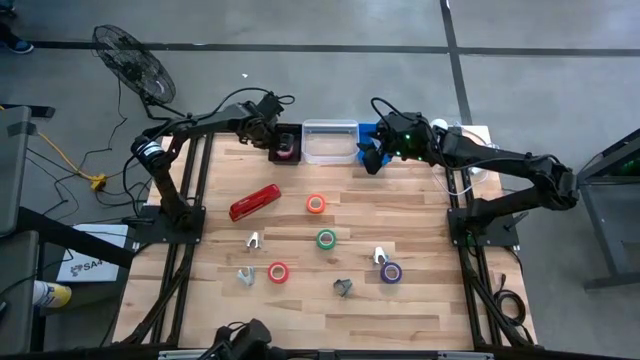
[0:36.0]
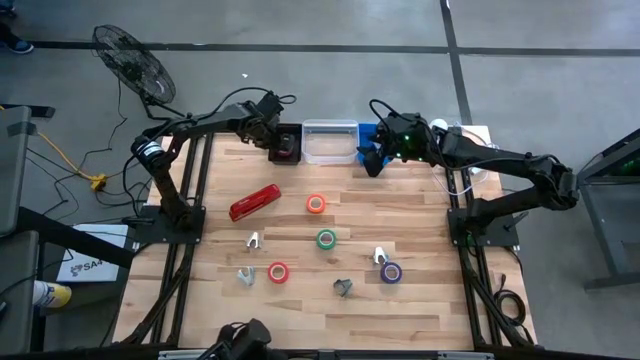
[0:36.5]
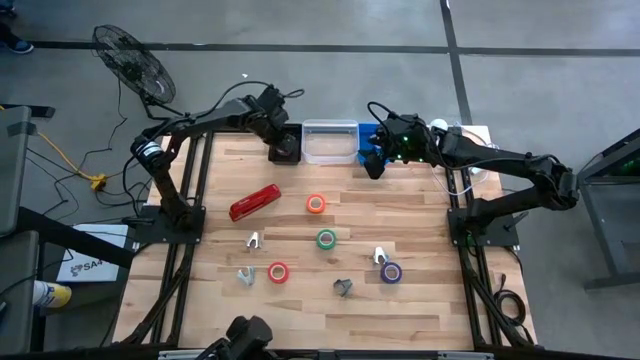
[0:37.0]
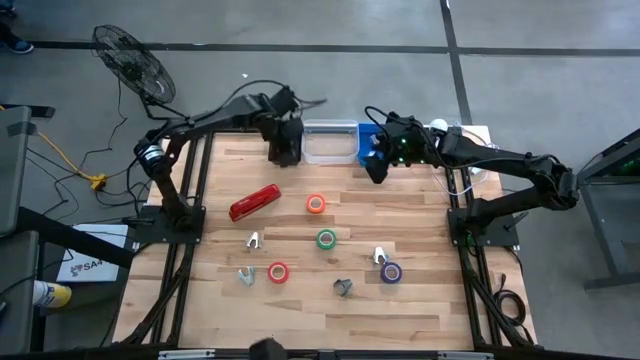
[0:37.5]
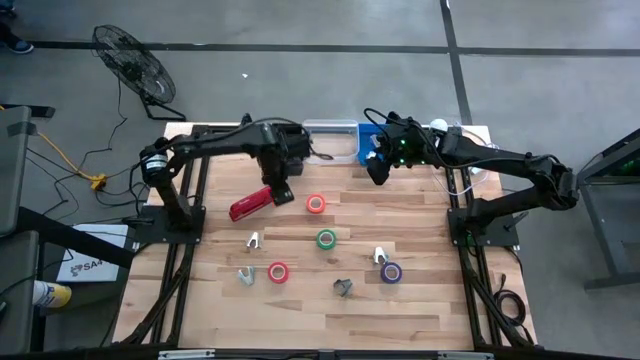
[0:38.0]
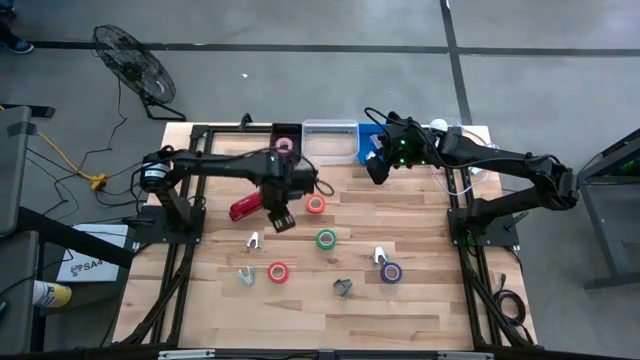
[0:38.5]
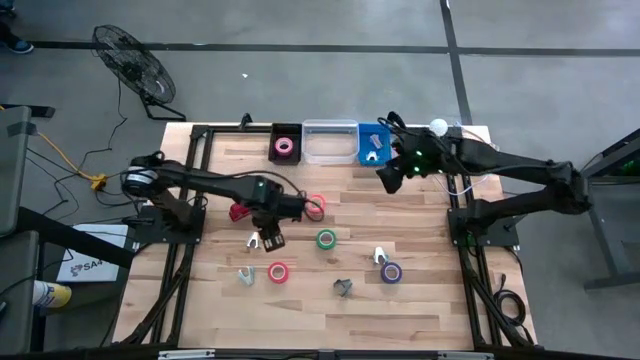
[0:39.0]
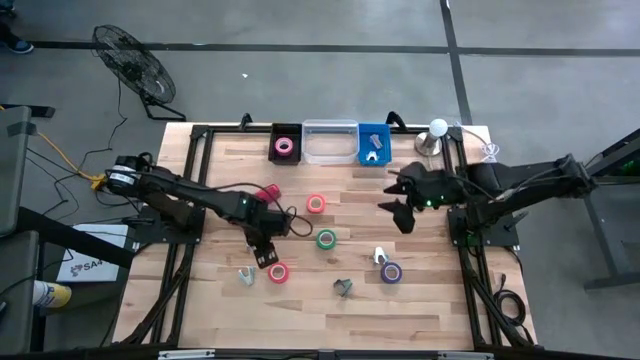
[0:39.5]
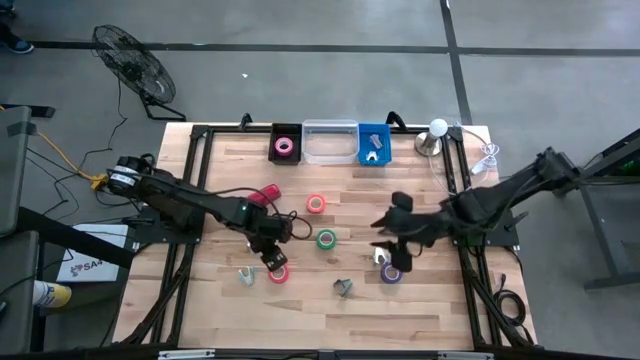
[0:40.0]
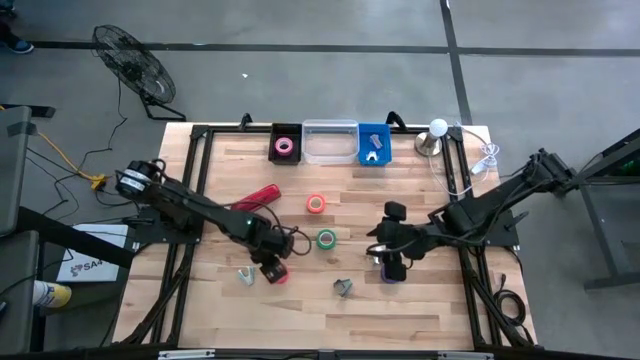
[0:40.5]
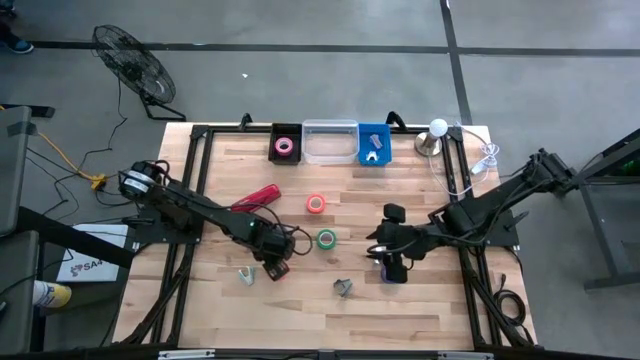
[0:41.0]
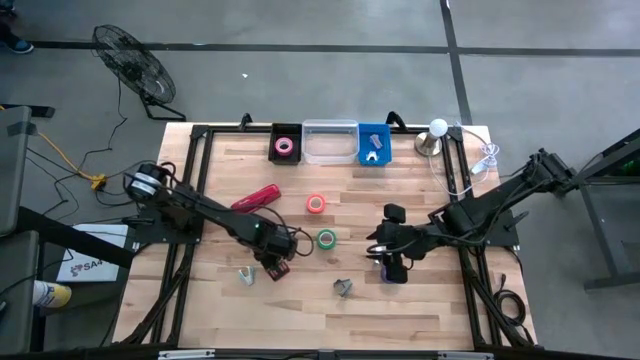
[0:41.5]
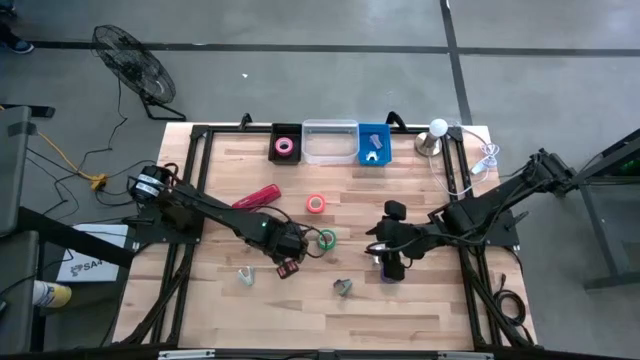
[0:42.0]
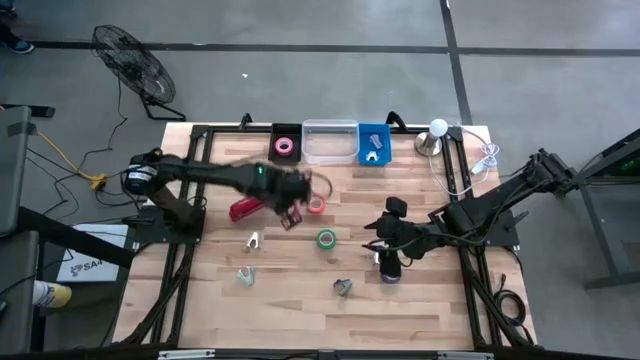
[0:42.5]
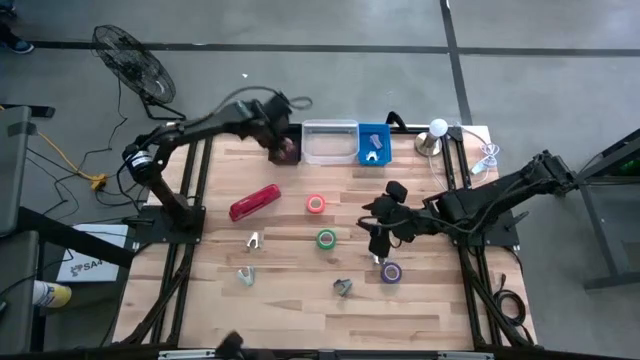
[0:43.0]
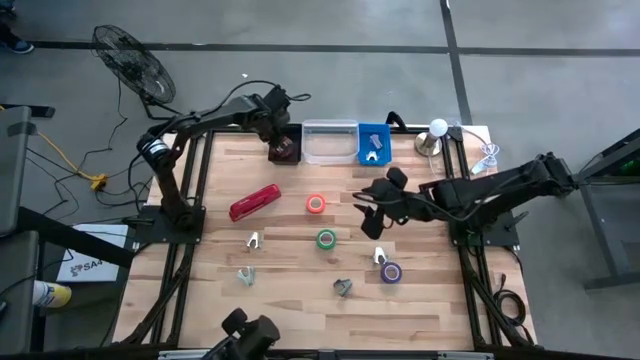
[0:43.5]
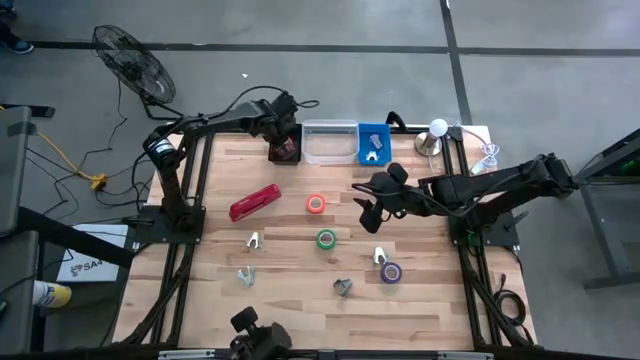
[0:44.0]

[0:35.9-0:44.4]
Task: Pick and place Stapler, Stapler remover, tape
Put the red tape into the black bin

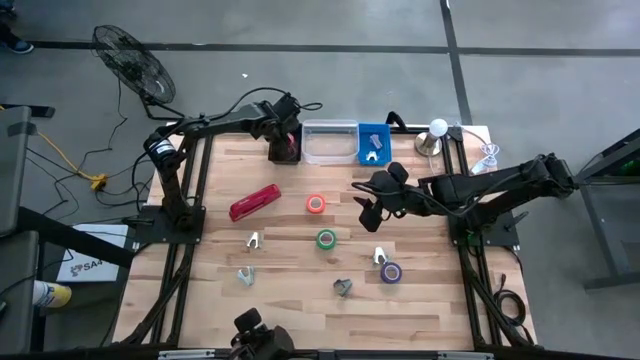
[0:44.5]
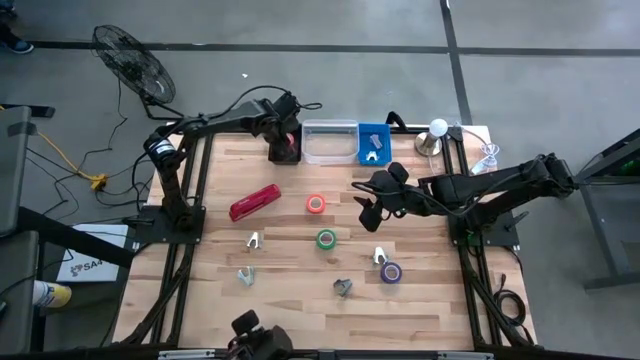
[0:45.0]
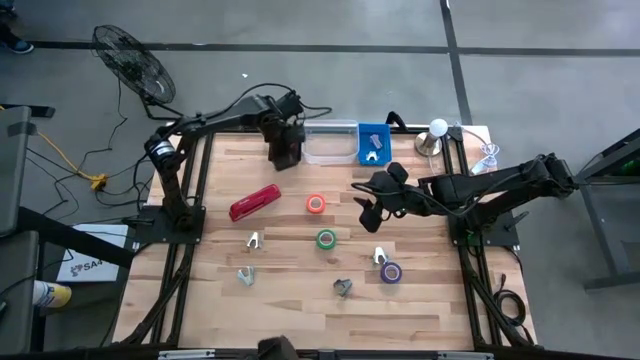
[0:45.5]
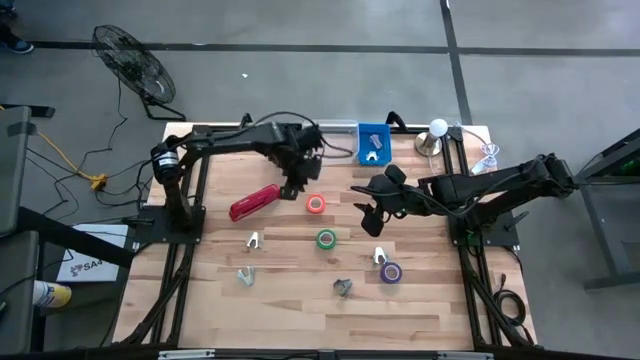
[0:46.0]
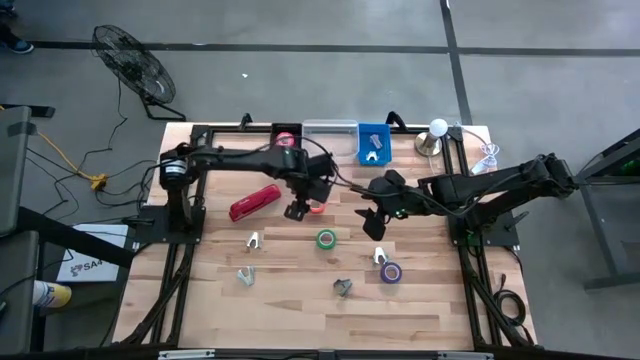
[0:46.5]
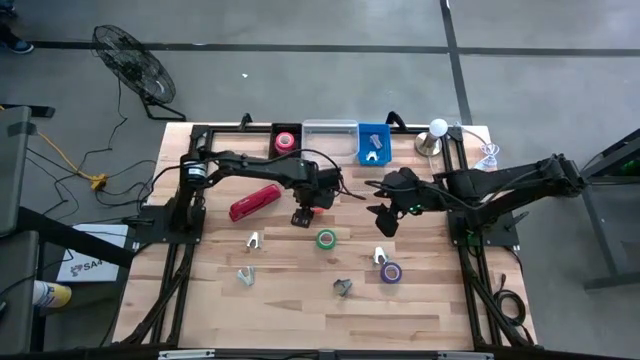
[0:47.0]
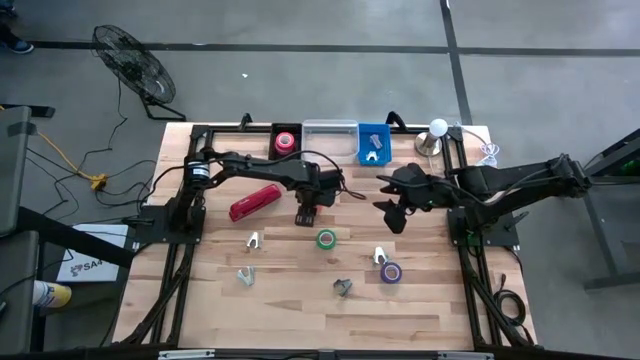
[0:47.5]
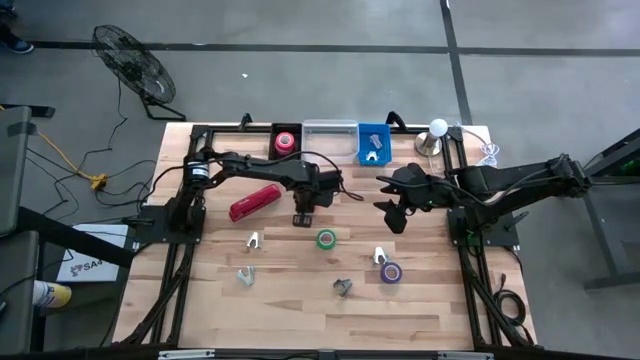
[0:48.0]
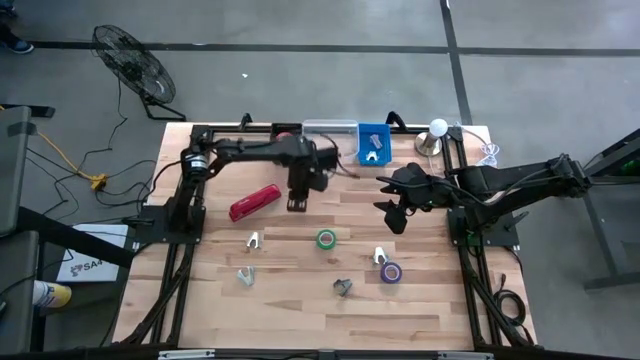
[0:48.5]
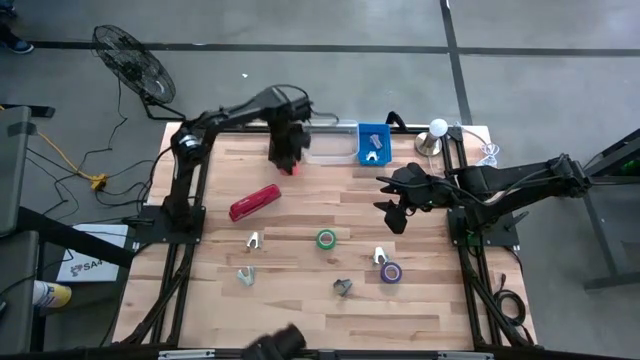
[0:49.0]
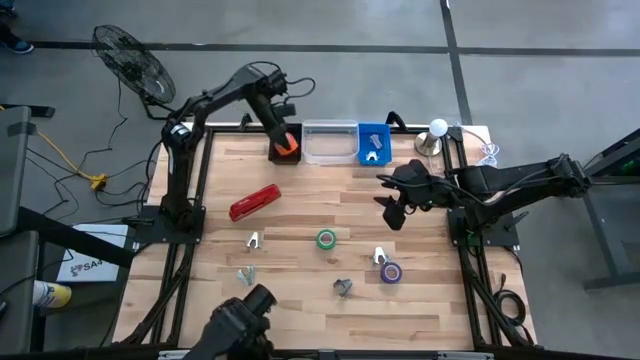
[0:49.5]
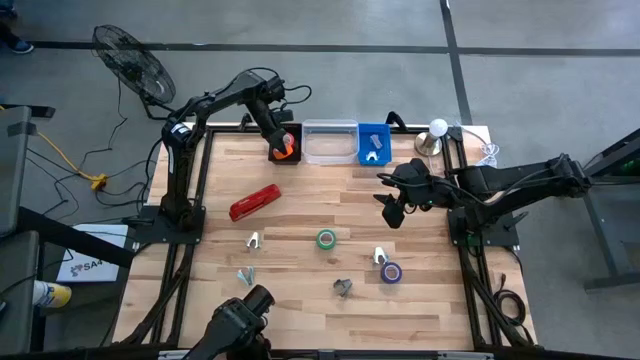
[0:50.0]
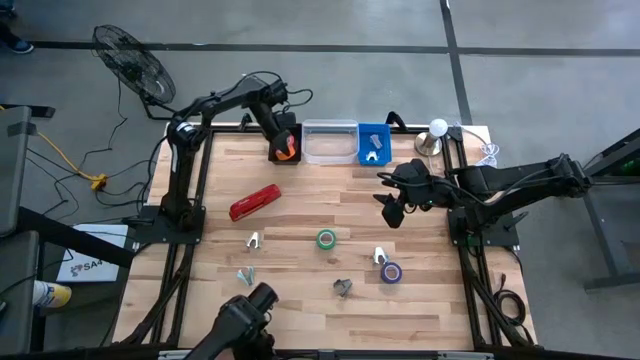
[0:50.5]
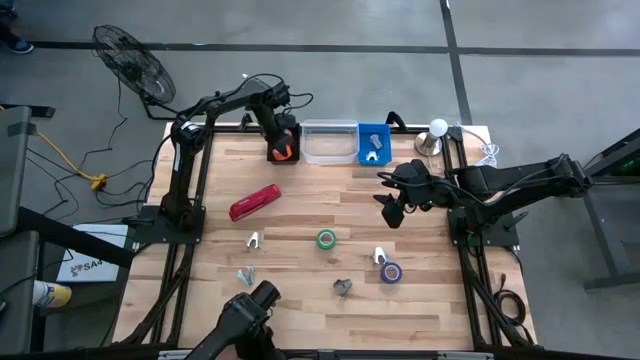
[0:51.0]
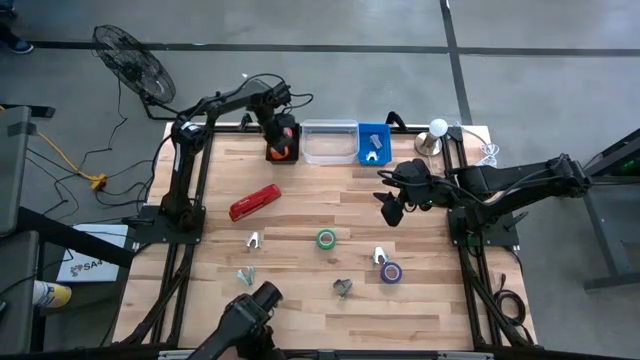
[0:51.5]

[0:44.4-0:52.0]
Put the orange tape into the black bin

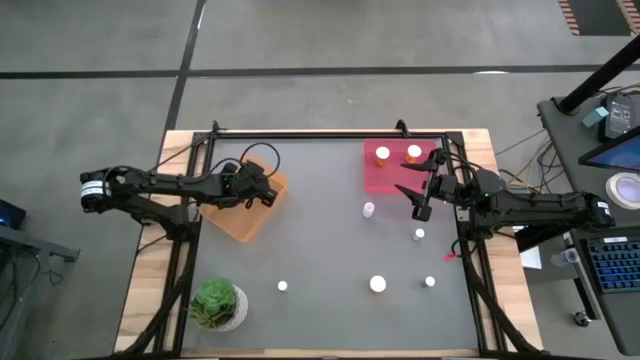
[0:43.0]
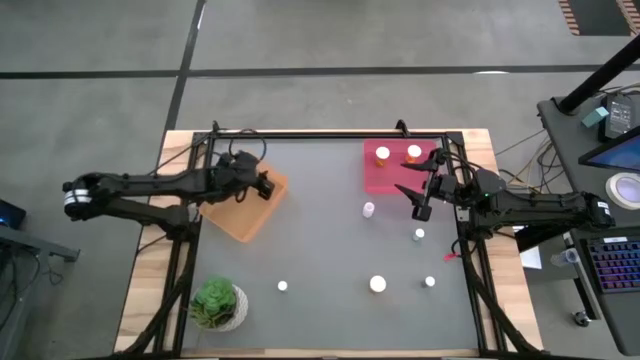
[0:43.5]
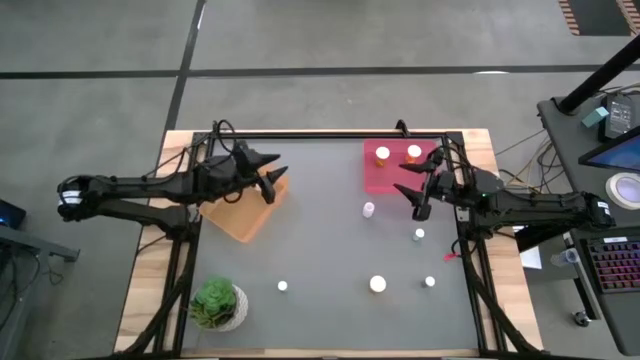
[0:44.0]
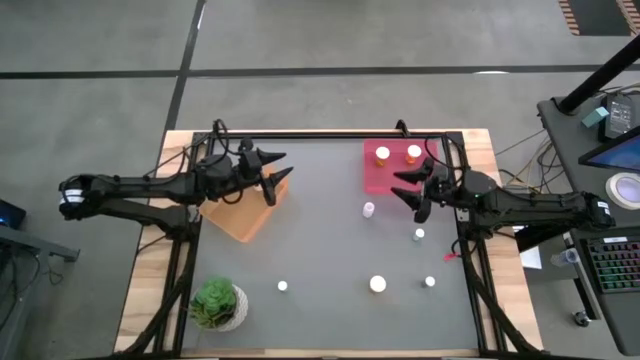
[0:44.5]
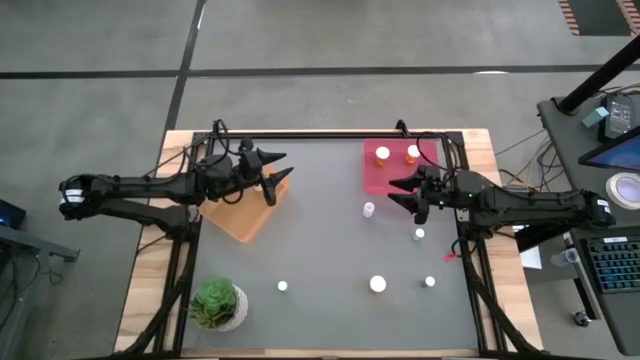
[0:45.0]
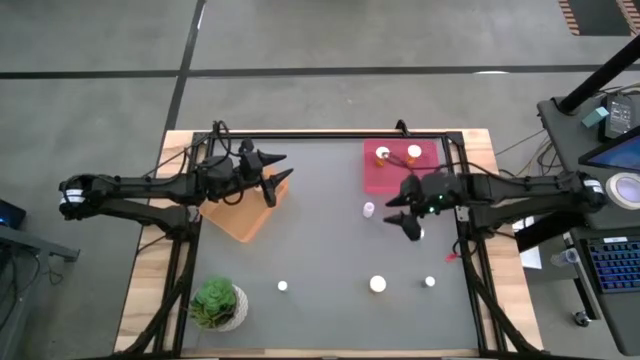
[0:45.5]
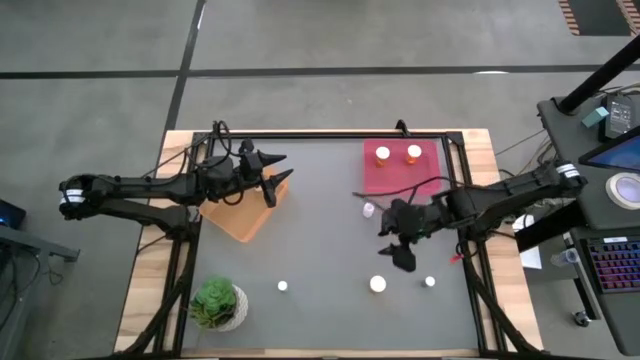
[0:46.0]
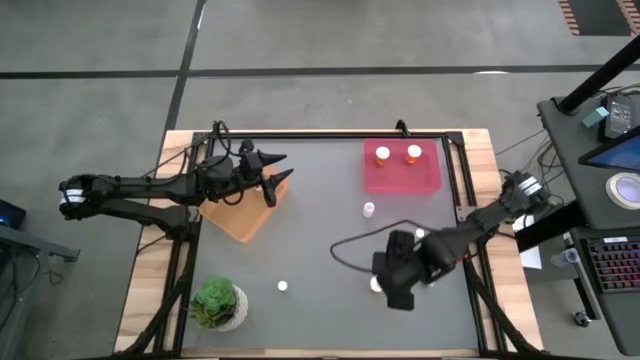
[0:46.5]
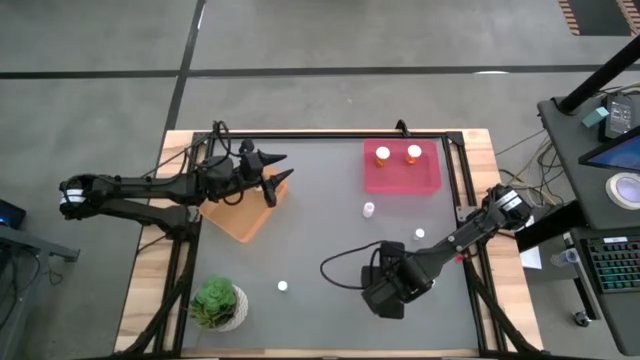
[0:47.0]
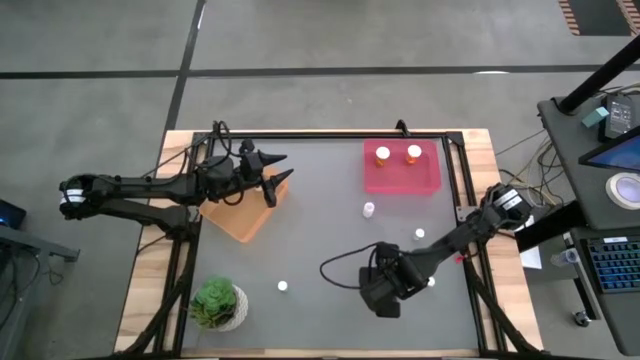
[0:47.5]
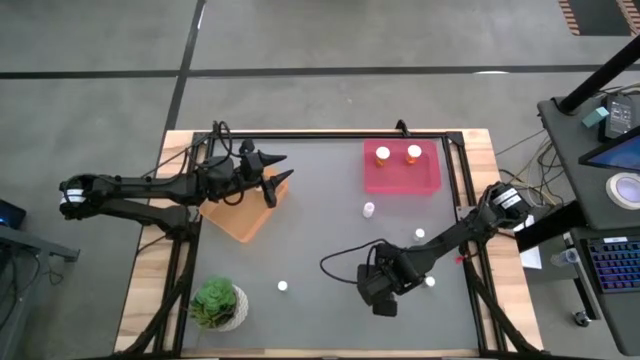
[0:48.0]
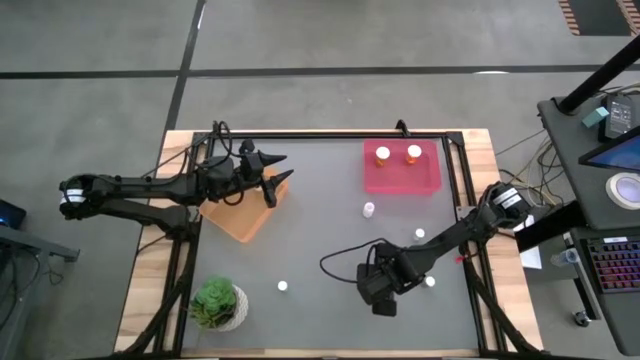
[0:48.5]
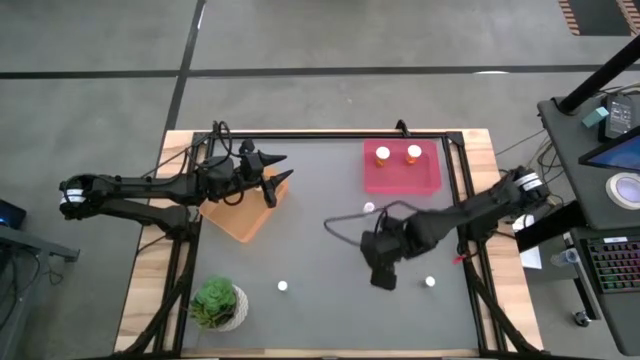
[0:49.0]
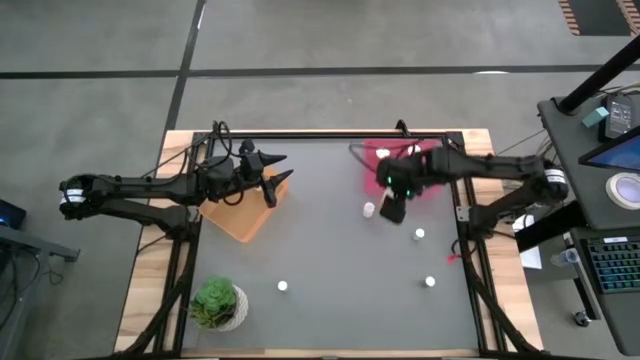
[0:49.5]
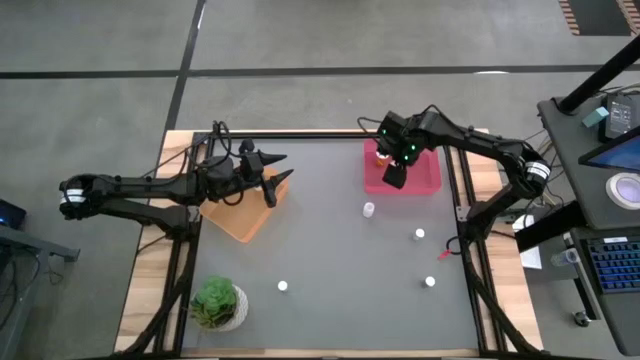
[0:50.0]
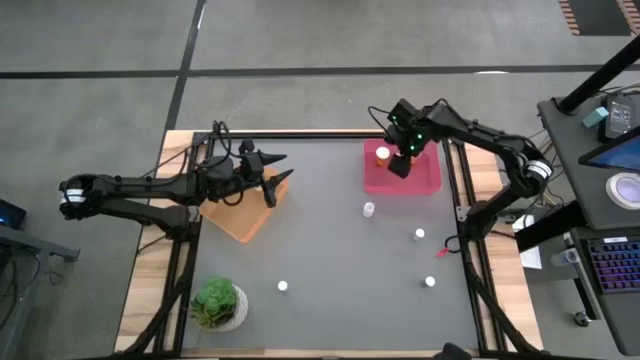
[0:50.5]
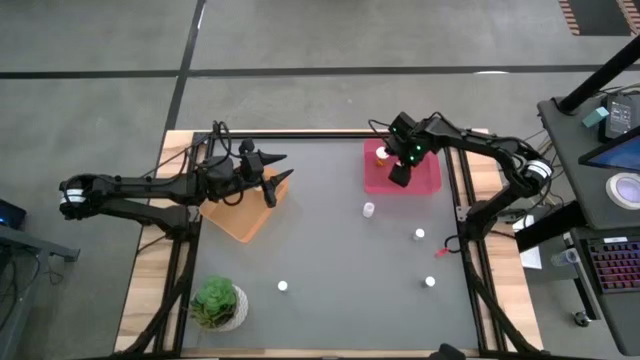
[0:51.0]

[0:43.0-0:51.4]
Task: Pick and place medicine bottles into bin by pill shape (circle, oval)
Put the orange capsule bottle into the pink bin
